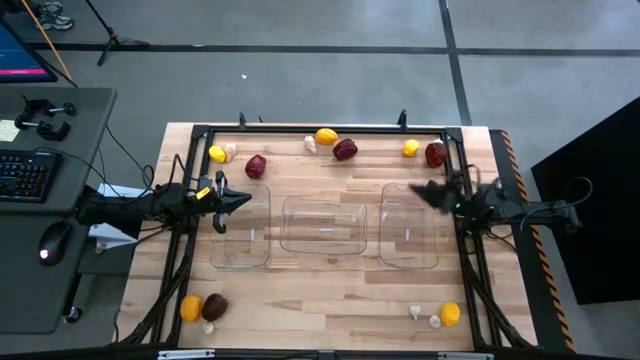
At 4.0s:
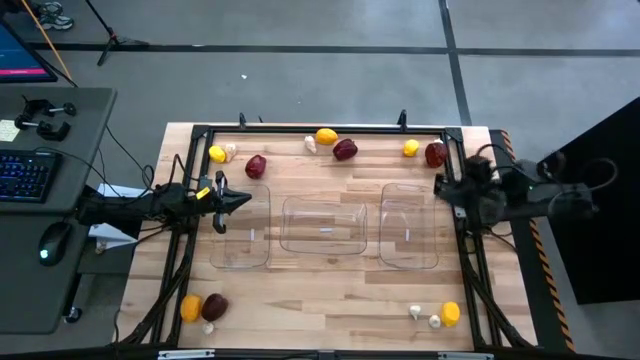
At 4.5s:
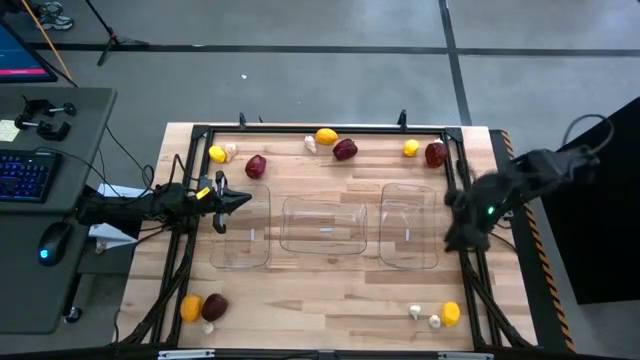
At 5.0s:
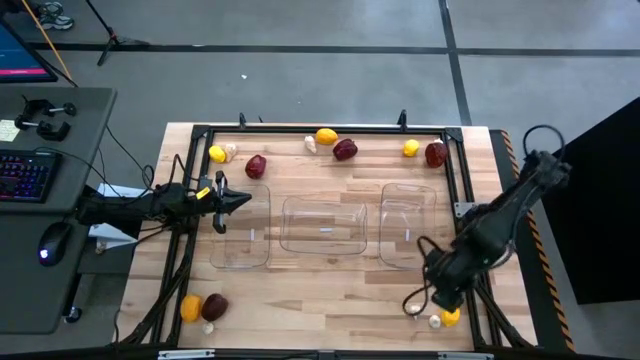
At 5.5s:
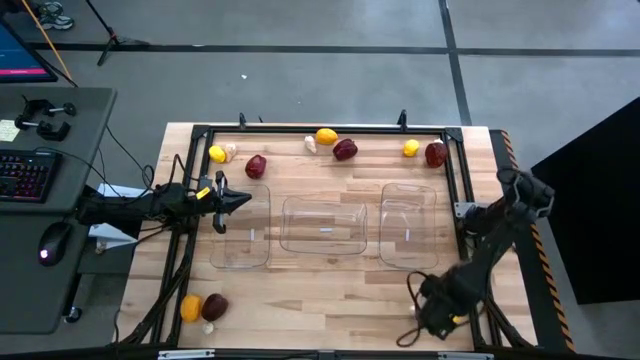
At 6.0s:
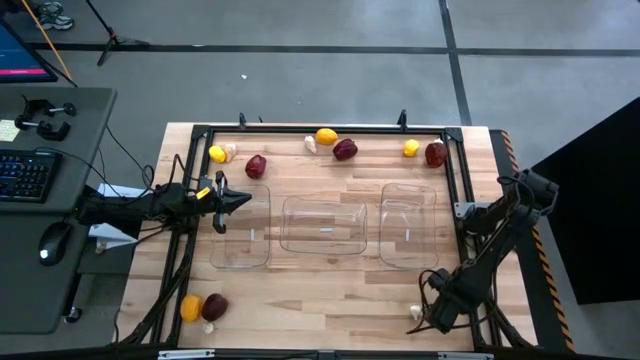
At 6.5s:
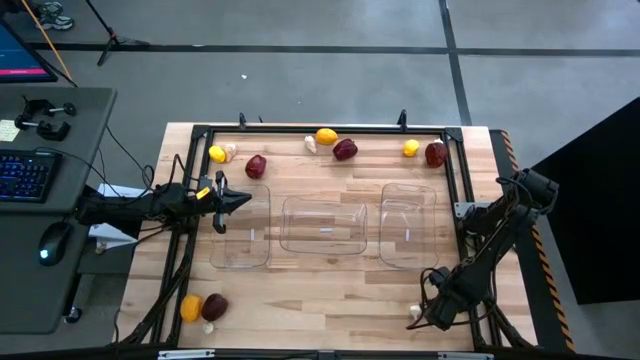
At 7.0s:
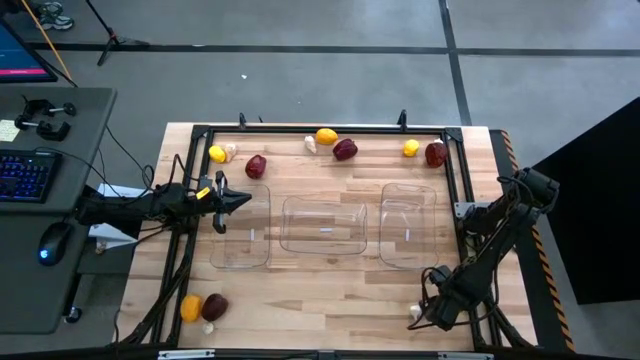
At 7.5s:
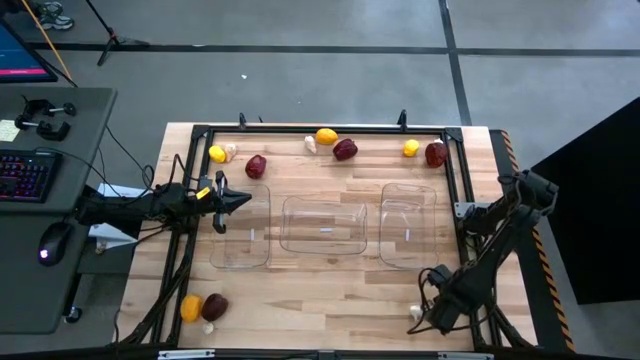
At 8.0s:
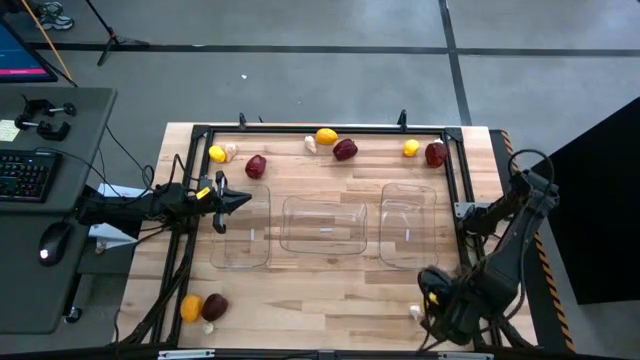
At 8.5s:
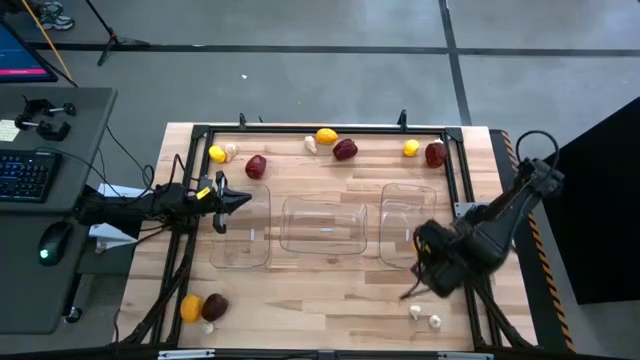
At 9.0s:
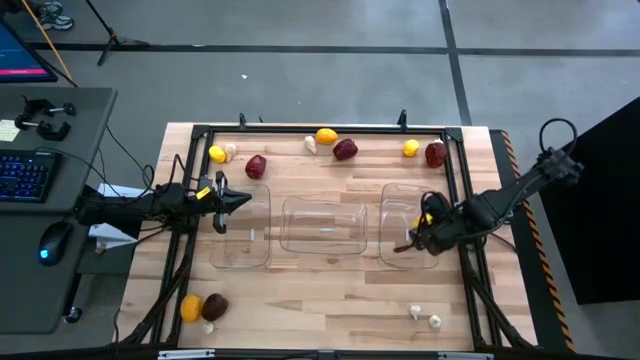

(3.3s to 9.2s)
Task: Sort produce into baskets
Put the bottom right yellow lemon into the right transparent bin

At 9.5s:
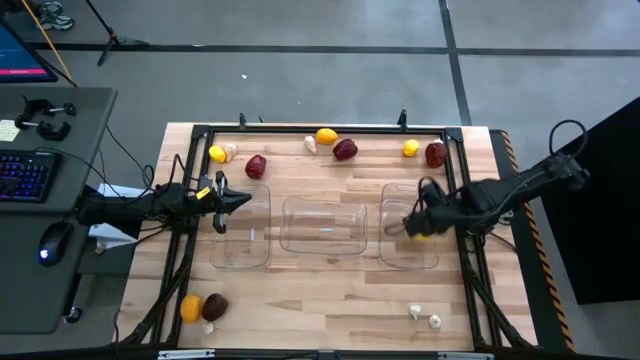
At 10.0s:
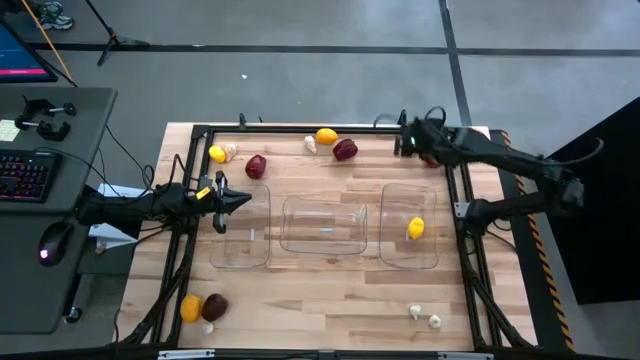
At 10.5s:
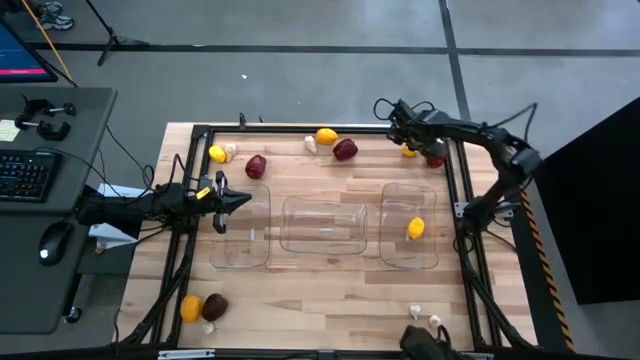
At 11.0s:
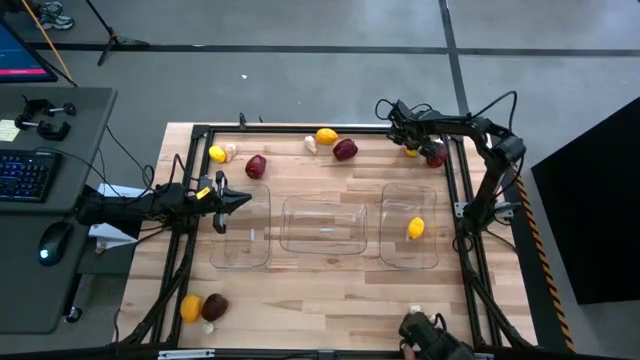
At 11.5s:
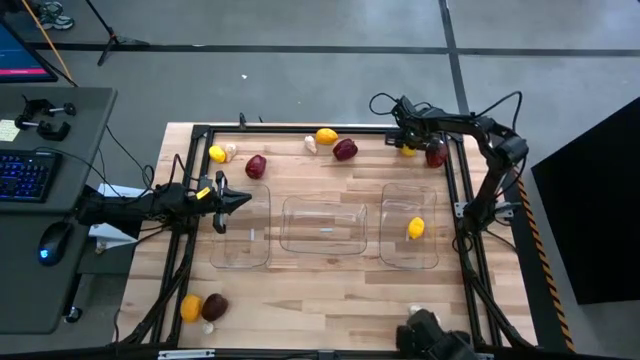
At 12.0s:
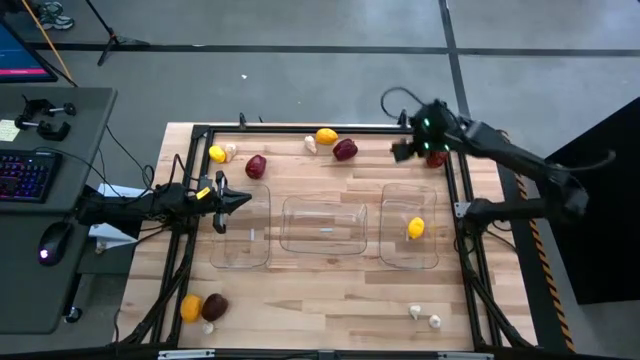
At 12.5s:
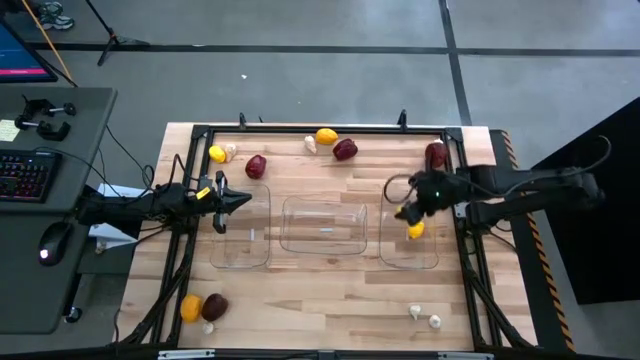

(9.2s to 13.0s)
Put the top right yellow lemon into the right transparent bin

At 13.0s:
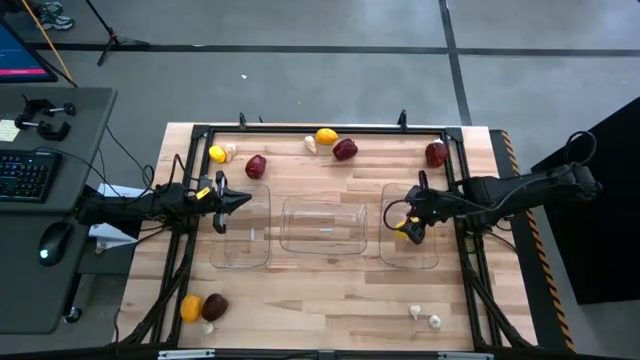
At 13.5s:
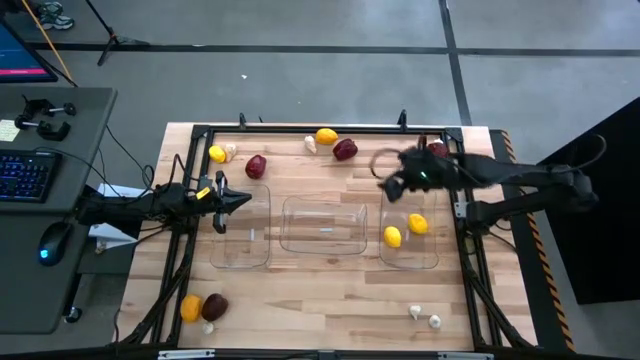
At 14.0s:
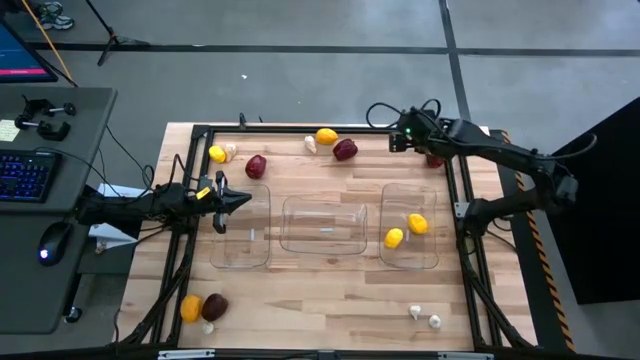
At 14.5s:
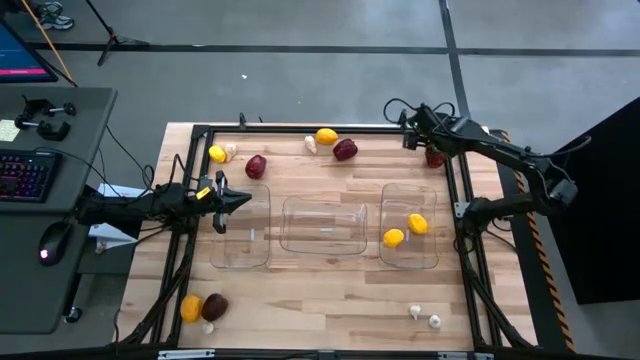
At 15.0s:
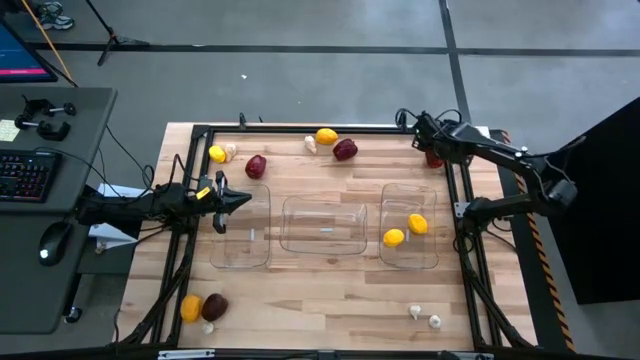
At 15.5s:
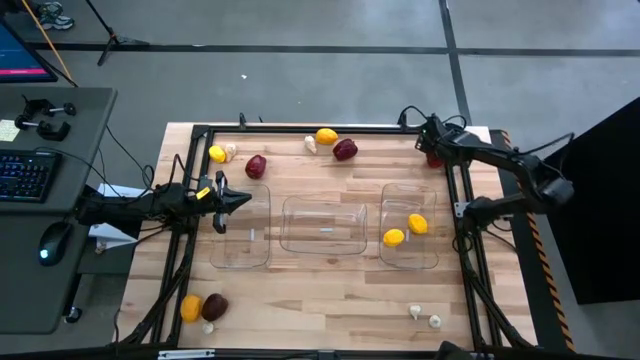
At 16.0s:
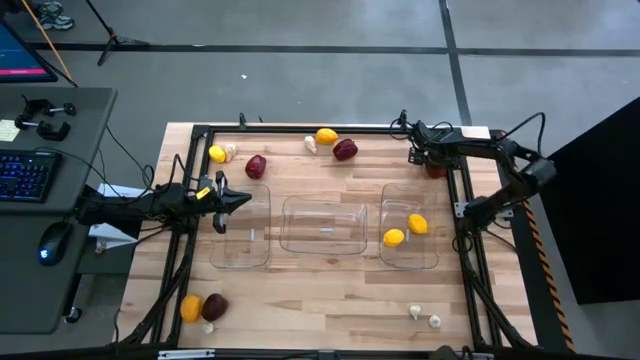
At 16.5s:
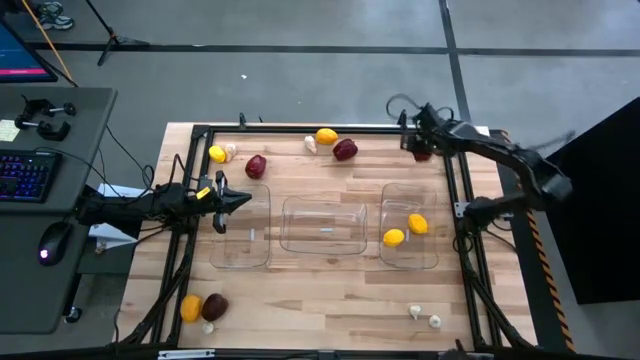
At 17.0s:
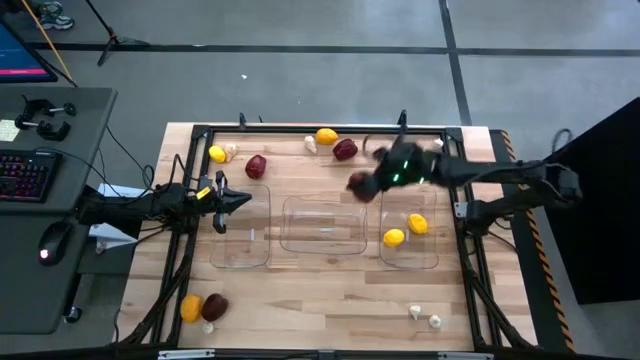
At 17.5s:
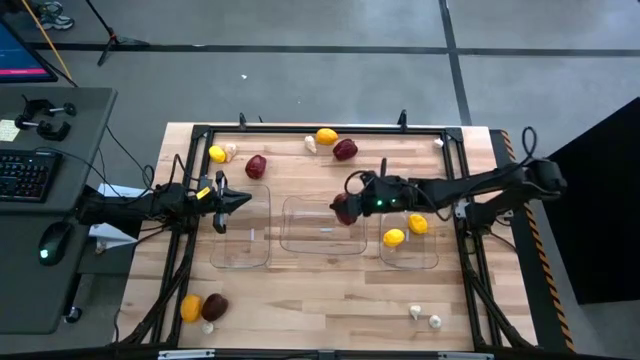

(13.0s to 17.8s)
Put the top right red apple into the center transparent bin

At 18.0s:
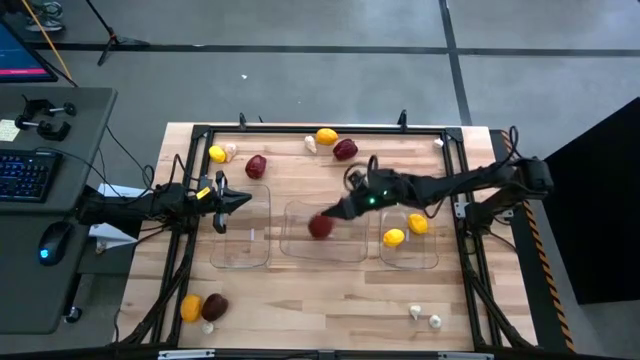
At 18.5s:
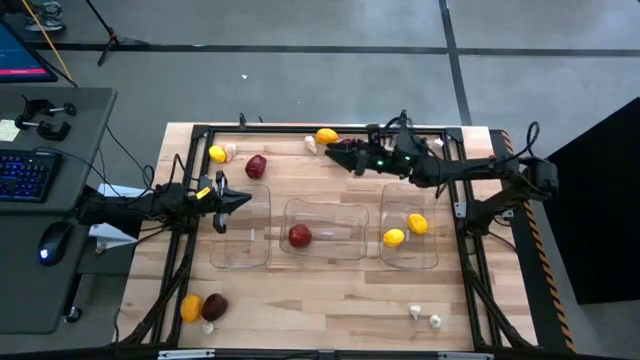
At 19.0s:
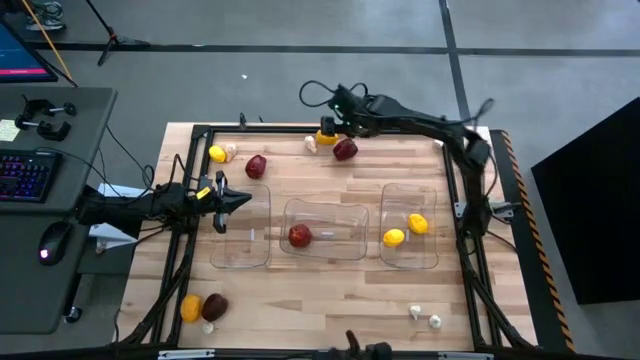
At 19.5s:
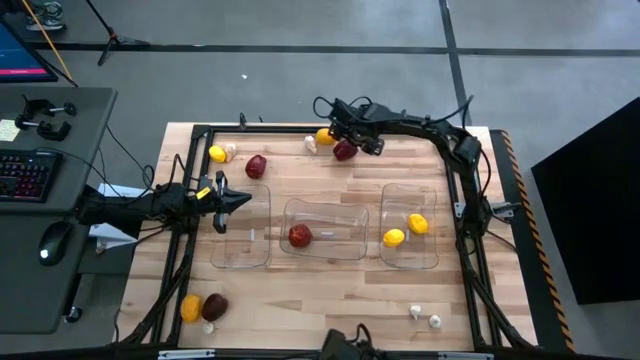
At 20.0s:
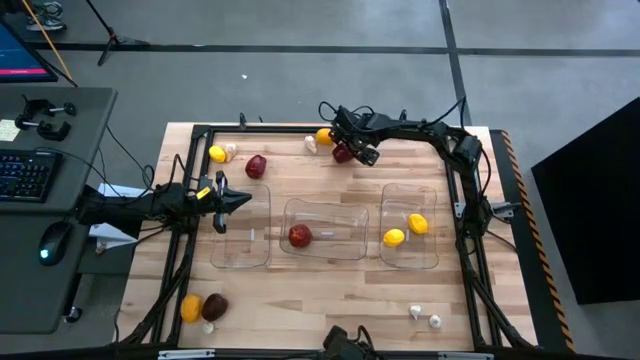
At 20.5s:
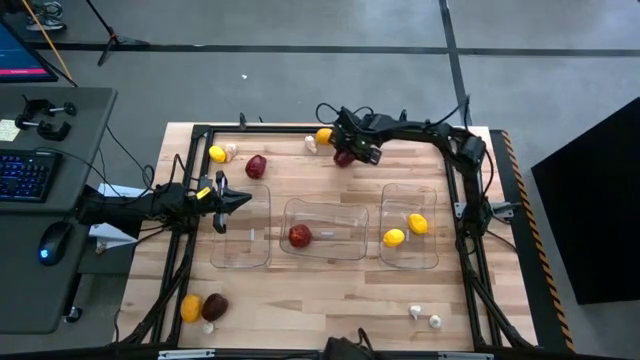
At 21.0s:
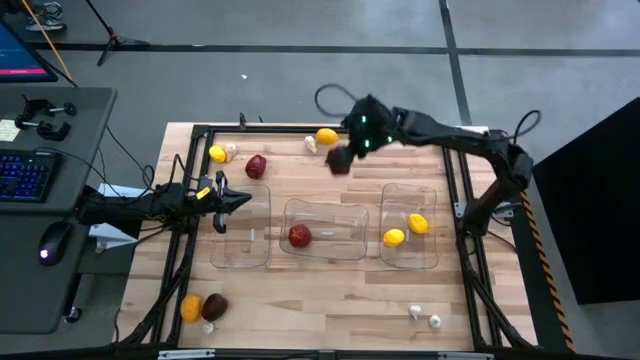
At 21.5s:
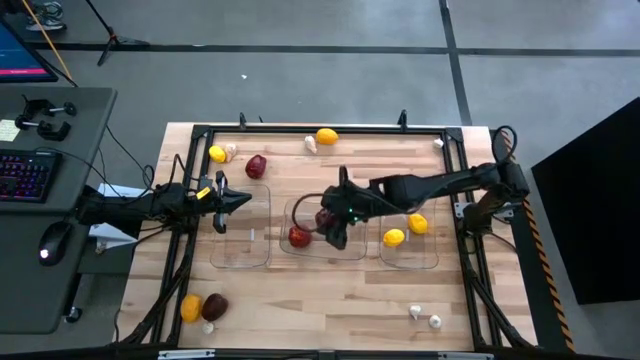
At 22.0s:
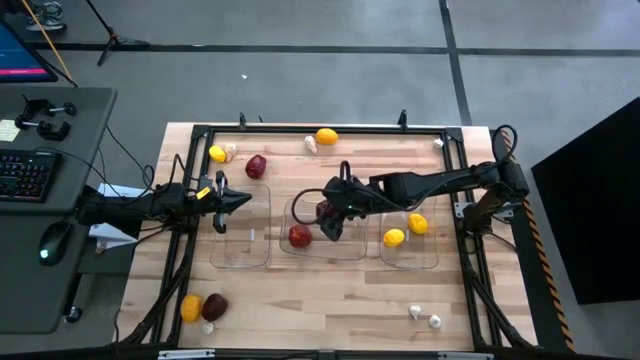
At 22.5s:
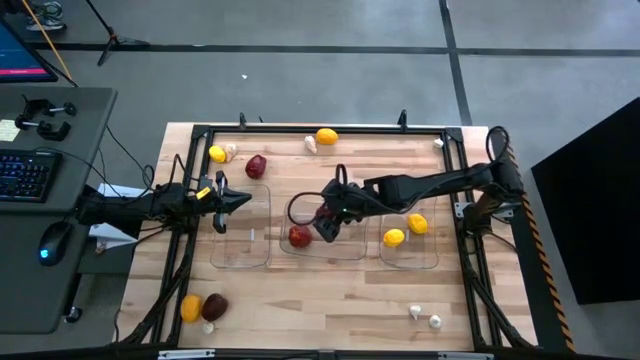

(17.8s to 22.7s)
Put the top right red apple into the center transparent bin

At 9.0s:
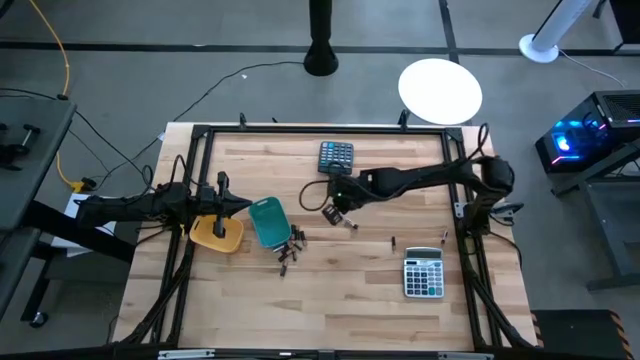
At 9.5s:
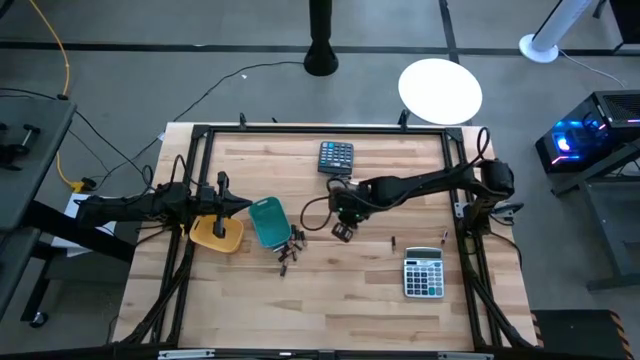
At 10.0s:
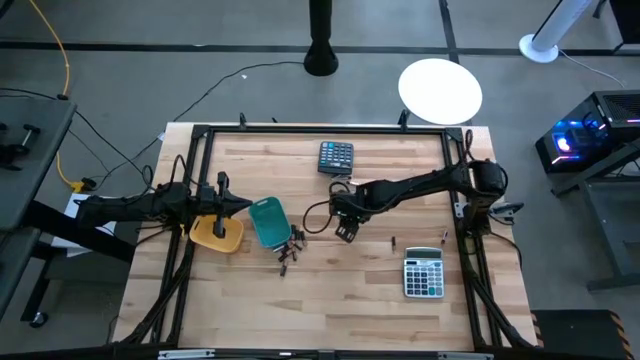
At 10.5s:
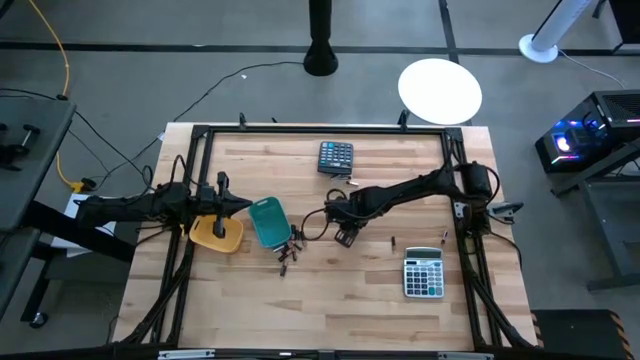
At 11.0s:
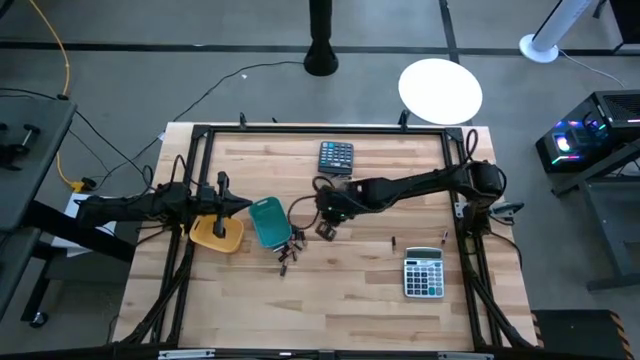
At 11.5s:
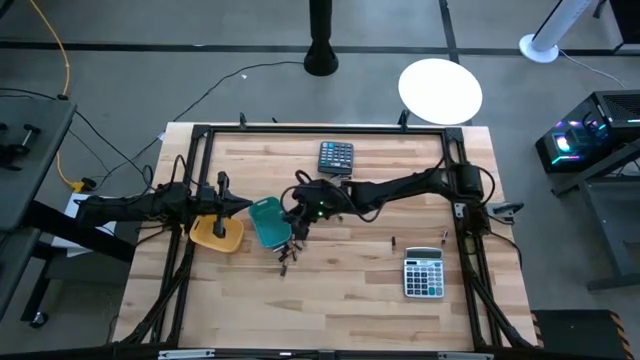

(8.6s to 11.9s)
Task: Sort batteries
Put the silver battery into the green bin
